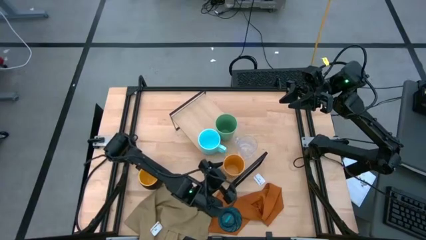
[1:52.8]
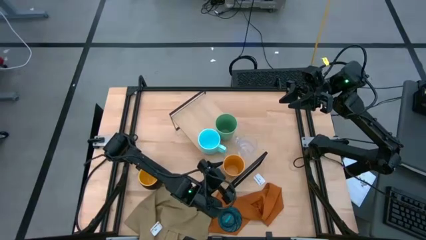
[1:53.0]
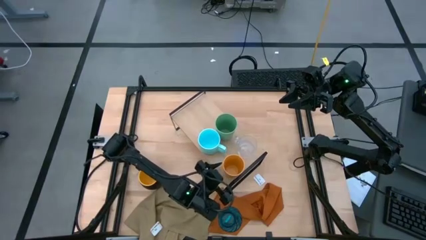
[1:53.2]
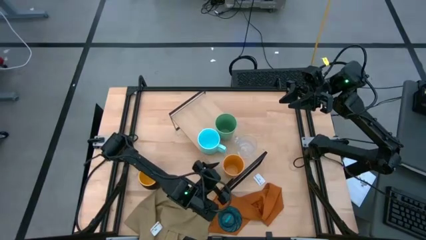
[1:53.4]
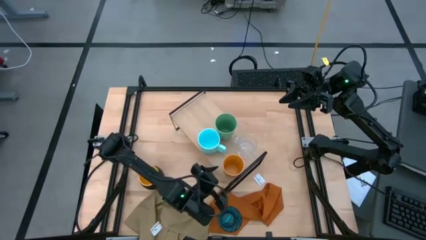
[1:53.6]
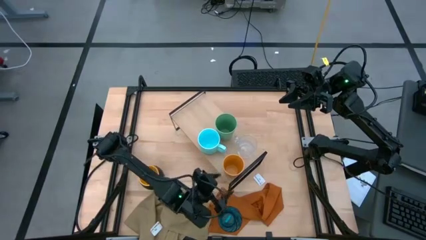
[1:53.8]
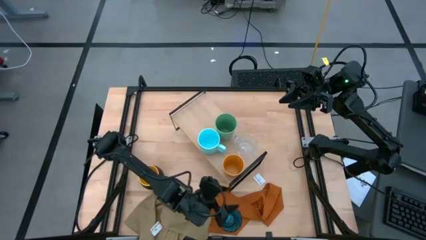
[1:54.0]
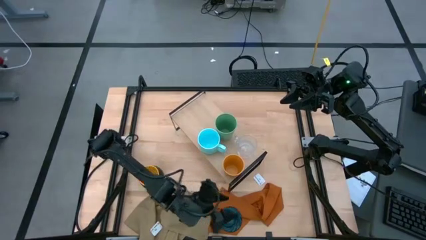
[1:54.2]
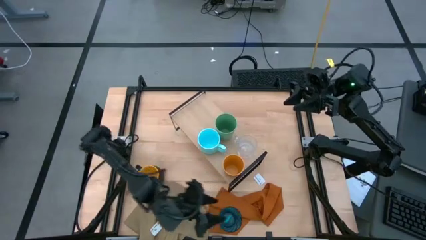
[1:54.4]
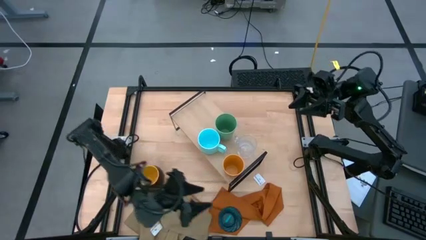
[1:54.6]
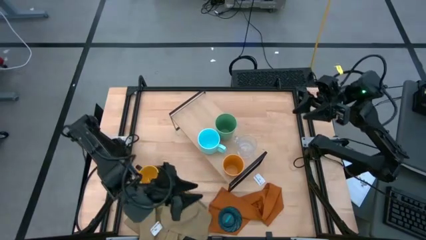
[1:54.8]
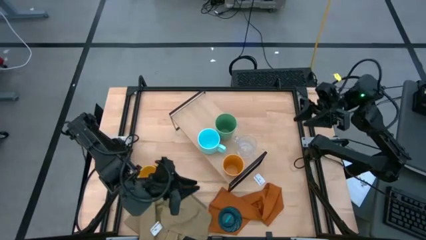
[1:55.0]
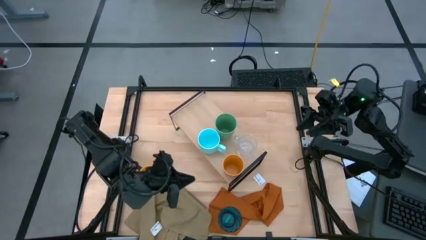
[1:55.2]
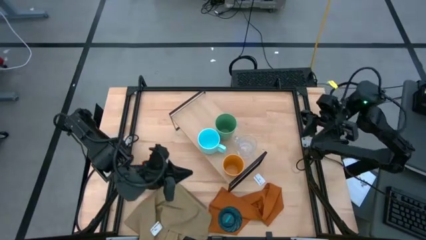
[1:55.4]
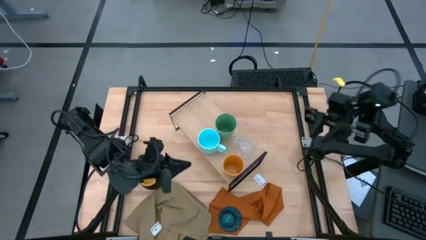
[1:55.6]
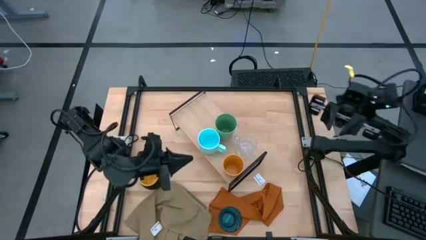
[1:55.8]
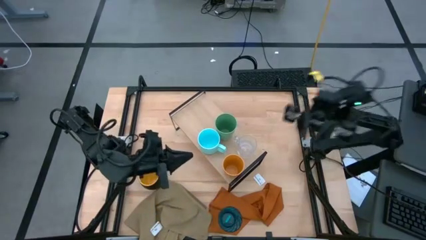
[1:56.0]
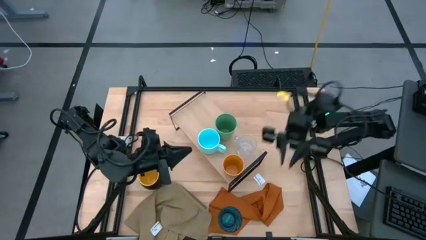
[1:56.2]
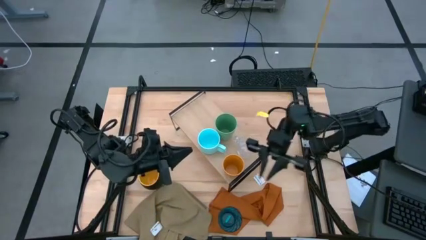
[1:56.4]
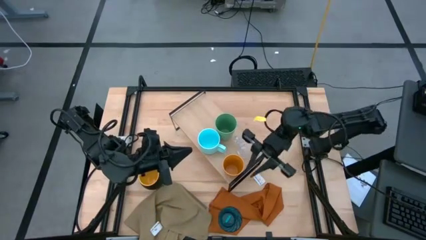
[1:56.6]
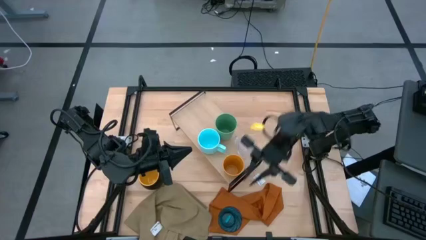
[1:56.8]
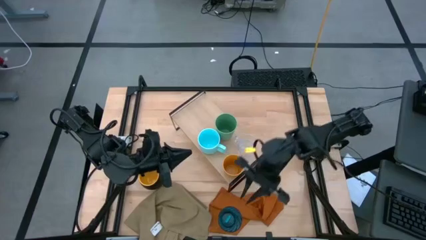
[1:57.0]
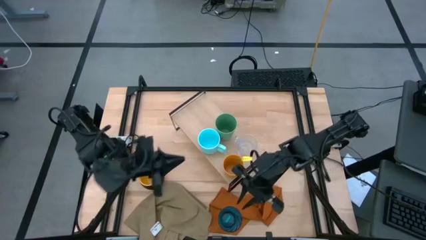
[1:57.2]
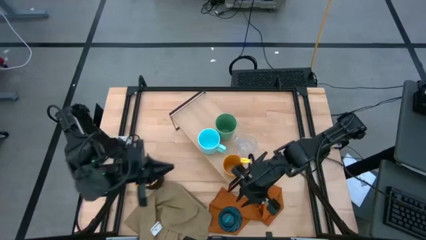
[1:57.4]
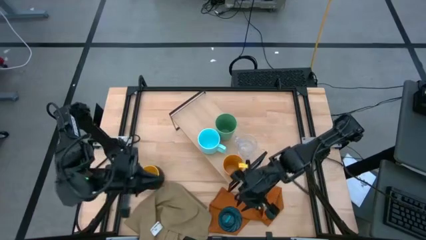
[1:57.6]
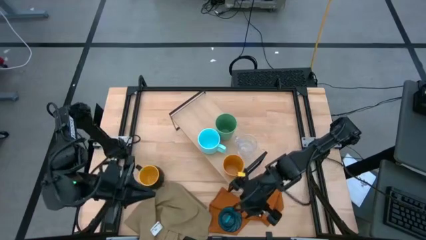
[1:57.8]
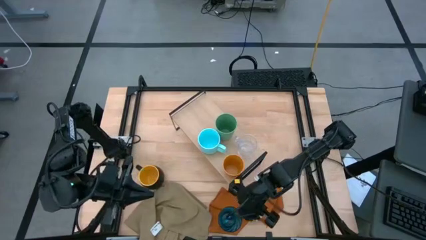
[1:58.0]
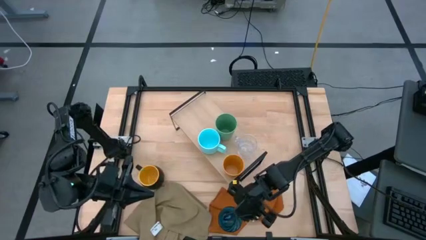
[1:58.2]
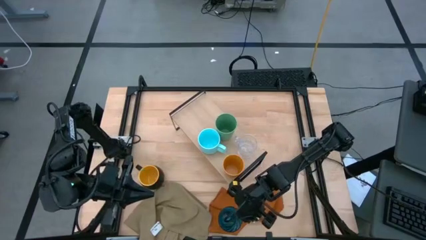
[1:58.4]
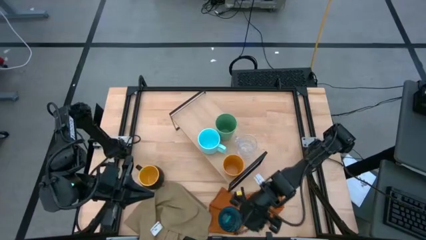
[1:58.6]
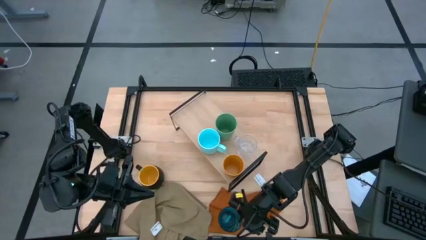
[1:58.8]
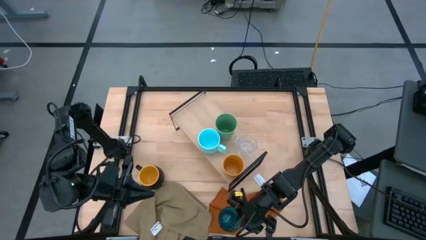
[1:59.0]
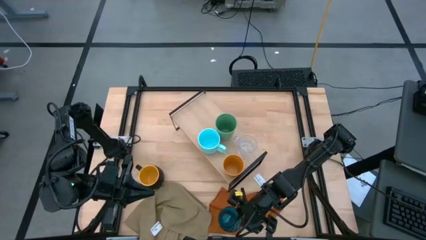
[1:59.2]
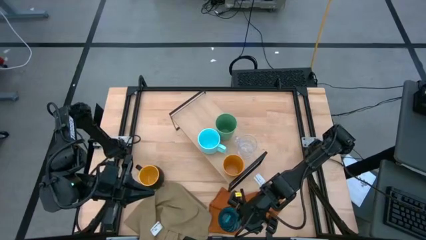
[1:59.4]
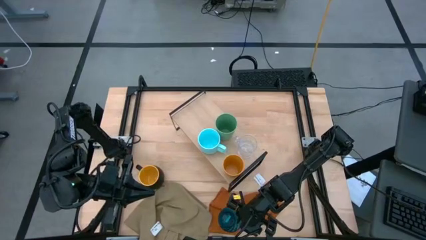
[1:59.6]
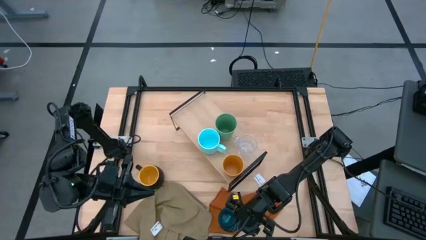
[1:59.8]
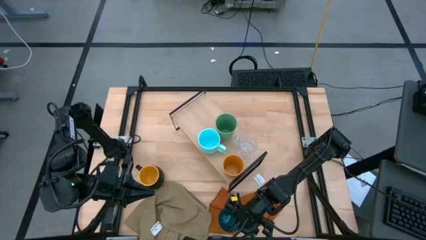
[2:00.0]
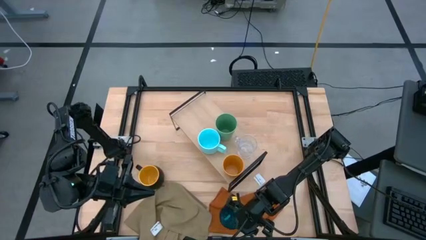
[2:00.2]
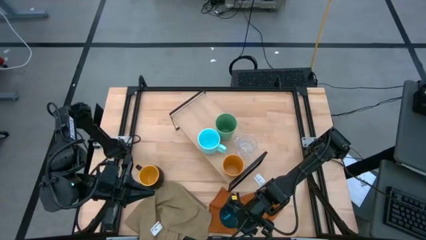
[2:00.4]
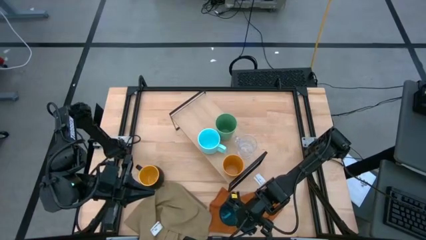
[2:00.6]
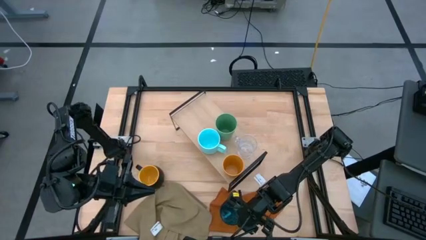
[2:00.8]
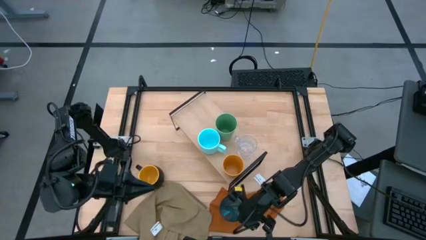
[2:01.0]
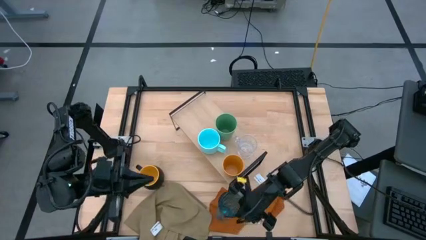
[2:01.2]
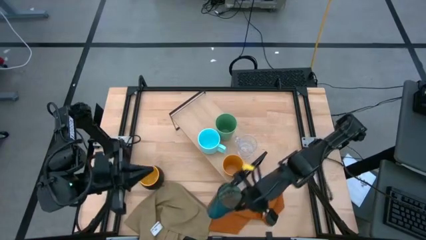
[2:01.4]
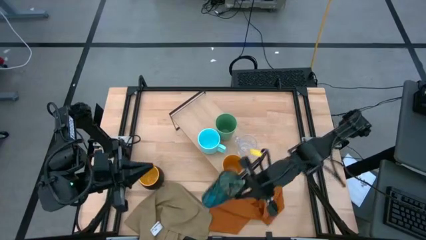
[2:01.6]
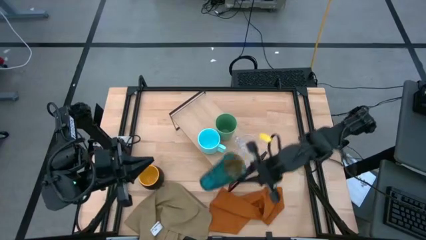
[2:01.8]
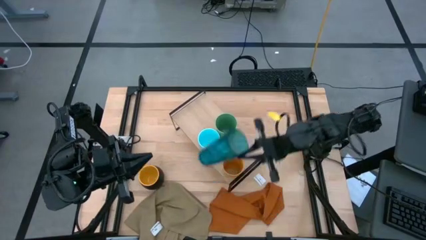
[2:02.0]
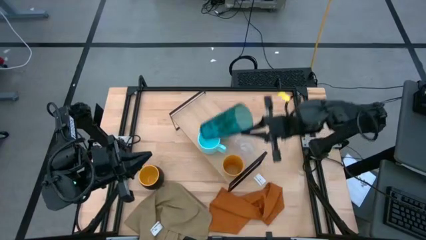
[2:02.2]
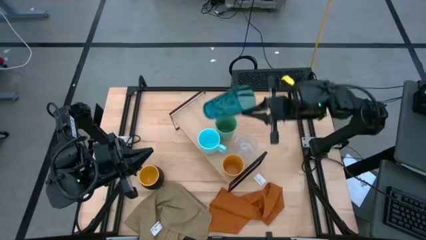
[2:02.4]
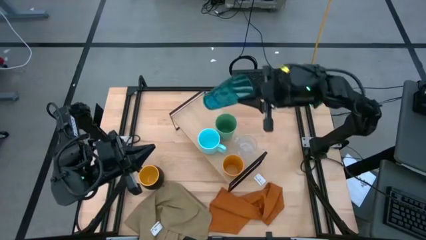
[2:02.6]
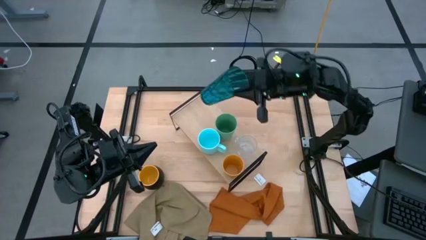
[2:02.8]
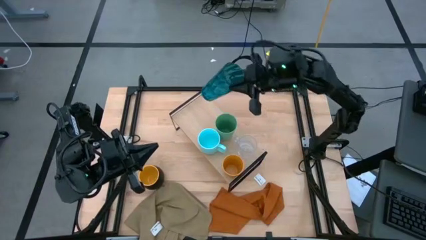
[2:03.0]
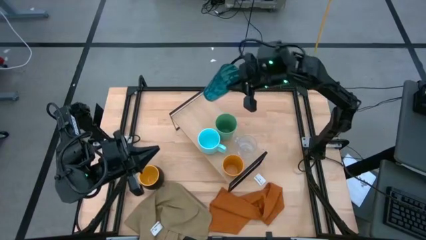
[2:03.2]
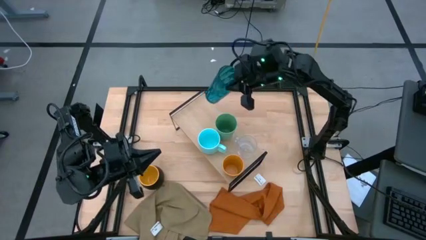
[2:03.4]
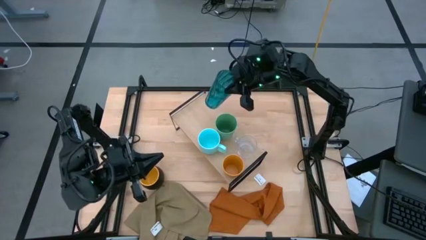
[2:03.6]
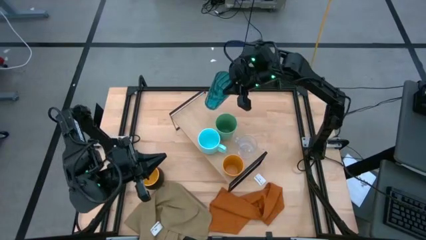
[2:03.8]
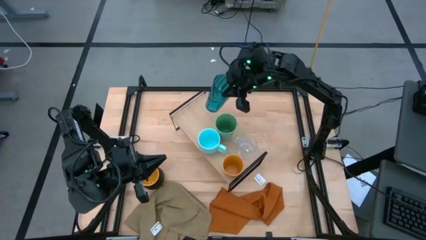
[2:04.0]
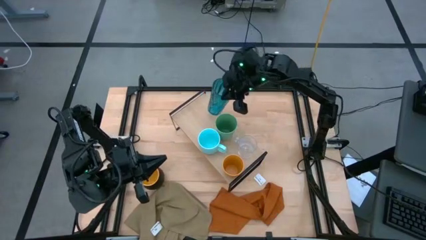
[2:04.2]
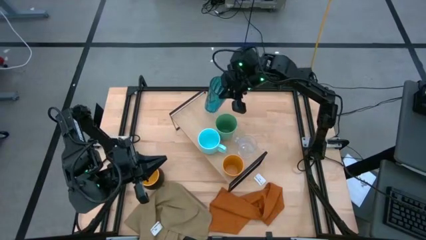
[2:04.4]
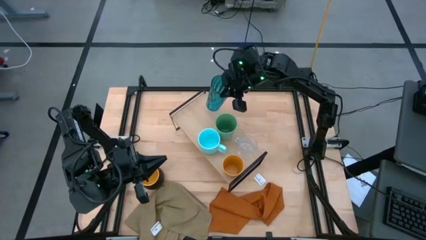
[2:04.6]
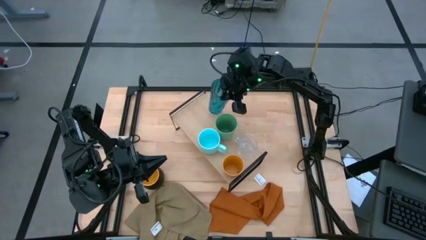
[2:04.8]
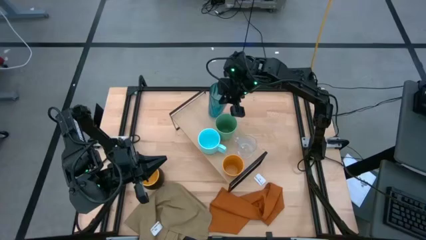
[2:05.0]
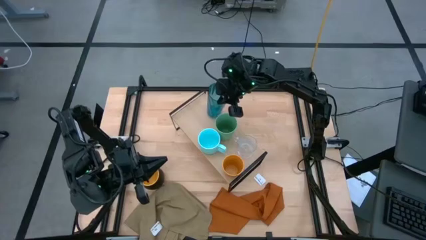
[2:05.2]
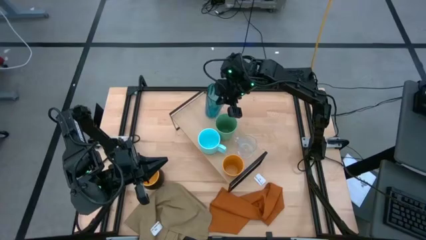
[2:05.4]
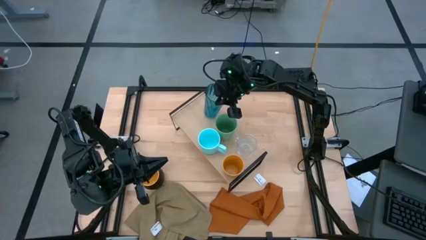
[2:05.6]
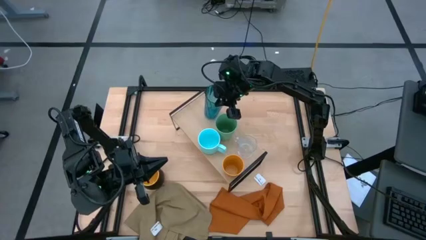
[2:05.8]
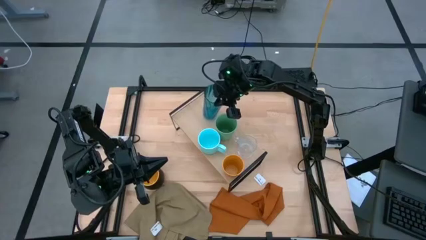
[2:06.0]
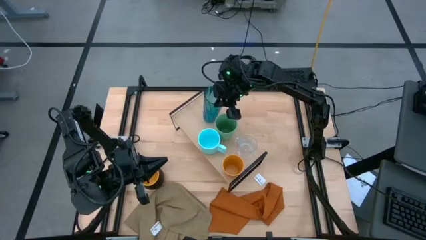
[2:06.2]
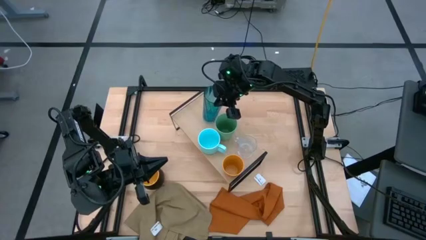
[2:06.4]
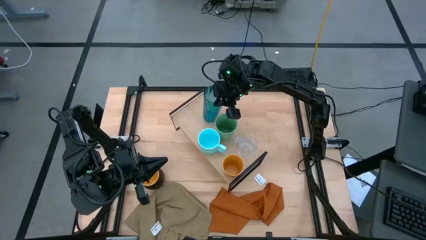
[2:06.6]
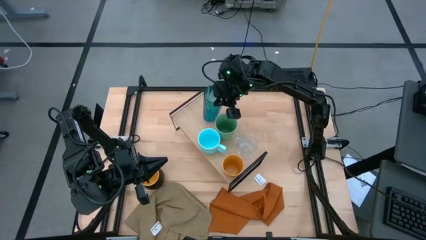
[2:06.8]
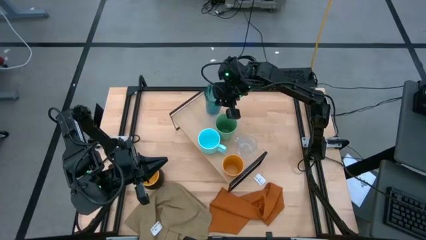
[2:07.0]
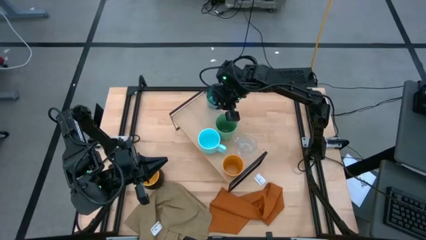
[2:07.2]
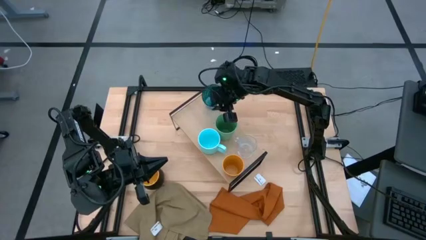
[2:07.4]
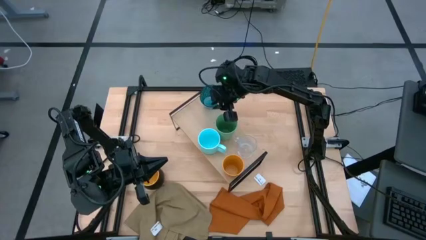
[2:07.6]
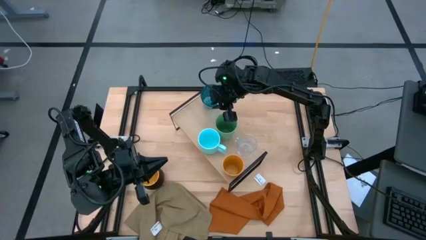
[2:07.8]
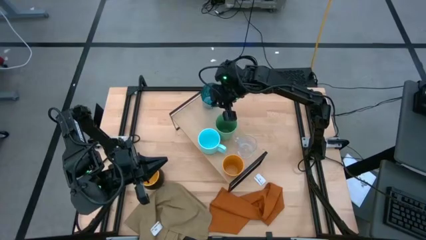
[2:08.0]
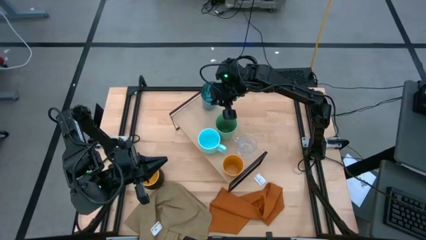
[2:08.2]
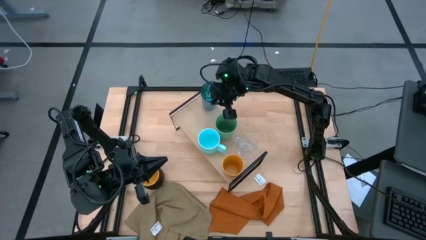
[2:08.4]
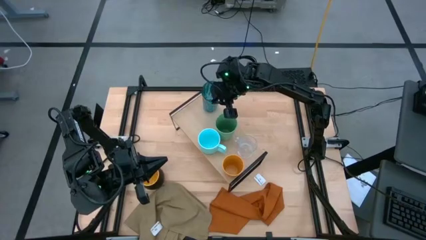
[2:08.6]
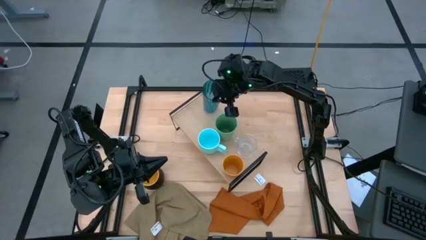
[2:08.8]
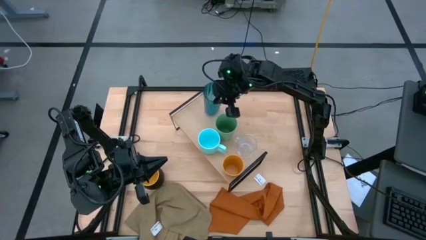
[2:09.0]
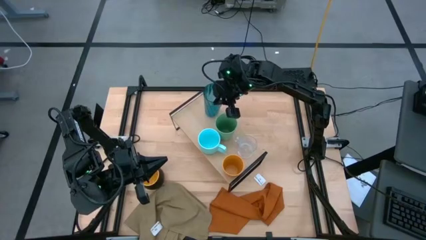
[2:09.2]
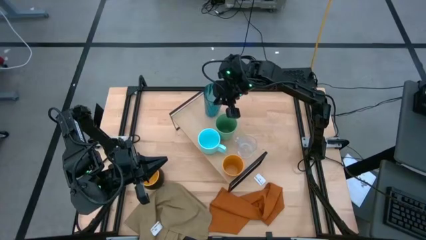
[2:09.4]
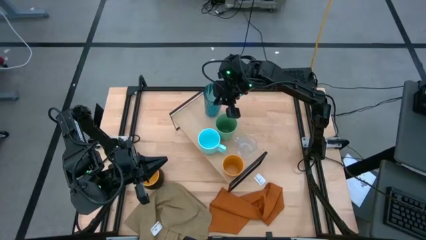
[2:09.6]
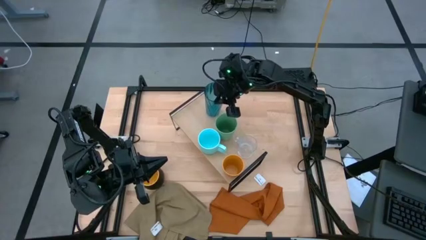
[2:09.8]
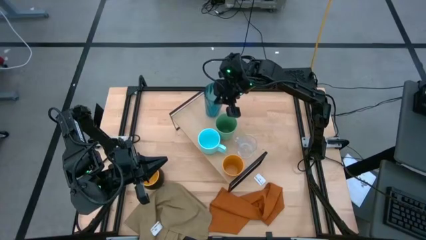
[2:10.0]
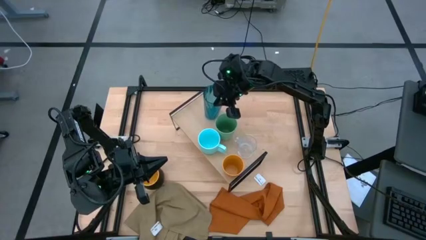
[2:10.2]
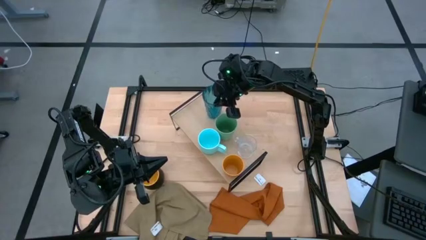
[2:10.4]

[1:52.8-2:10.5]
Task: Stack small to large cups/mugs on shelf
Put the blue cup on the shelf
